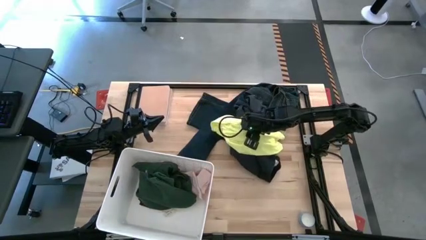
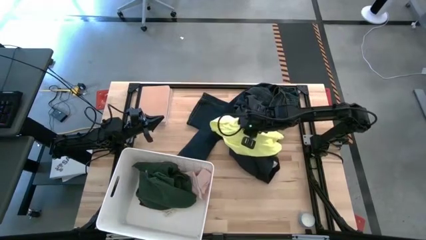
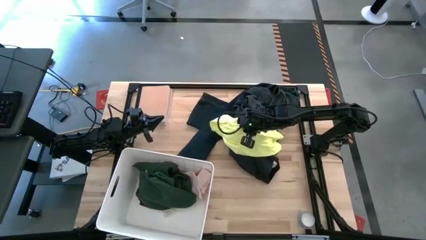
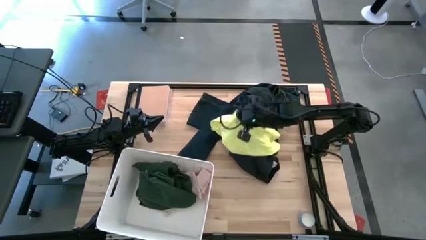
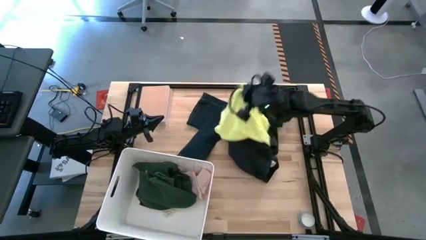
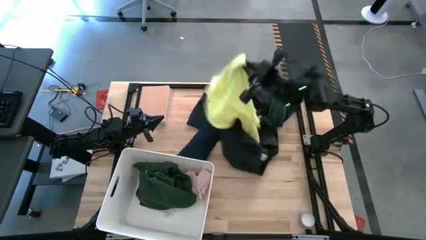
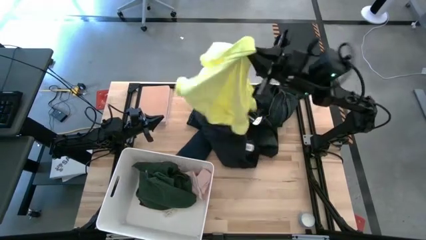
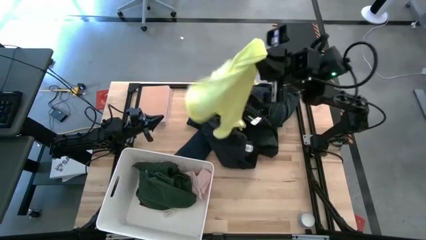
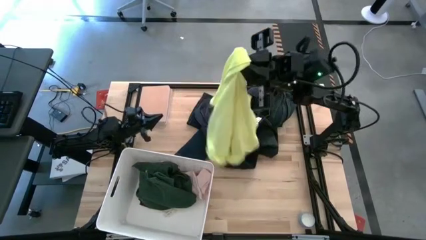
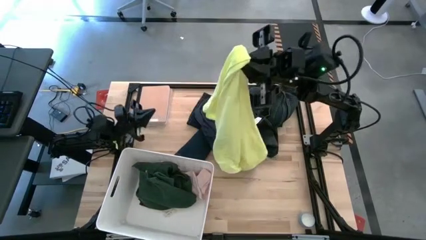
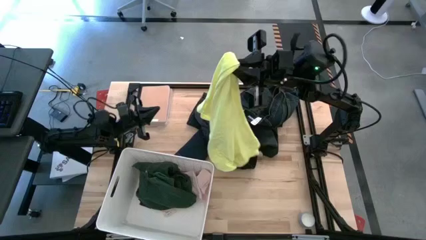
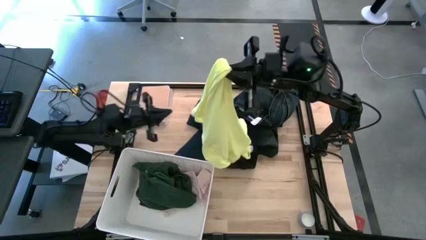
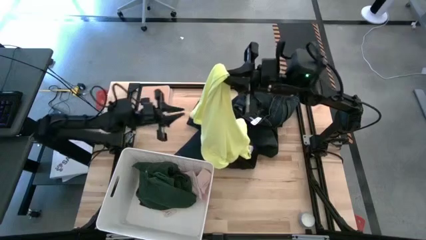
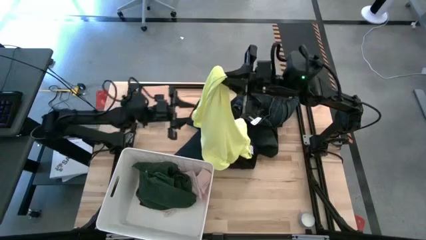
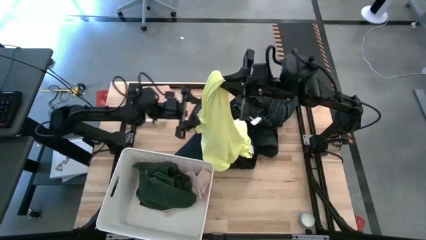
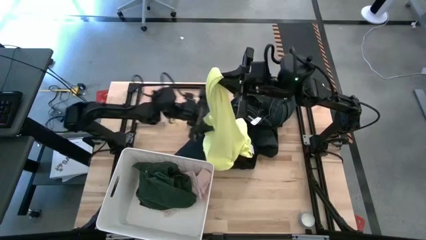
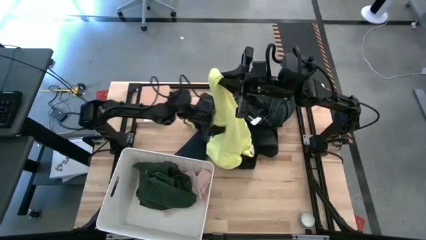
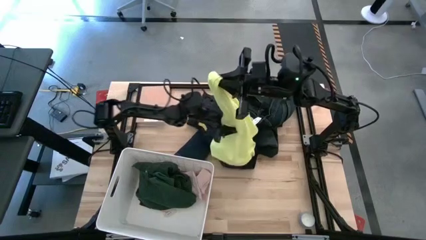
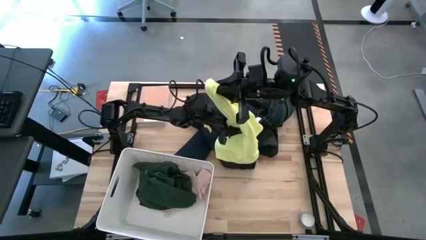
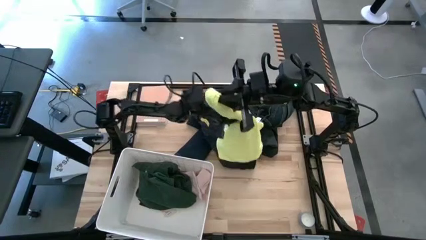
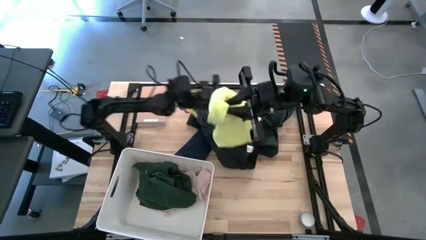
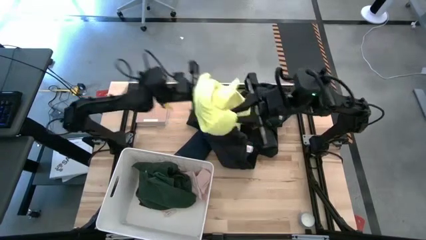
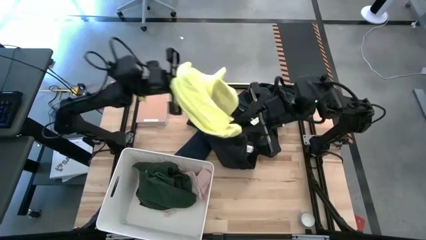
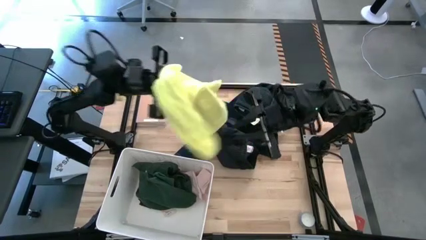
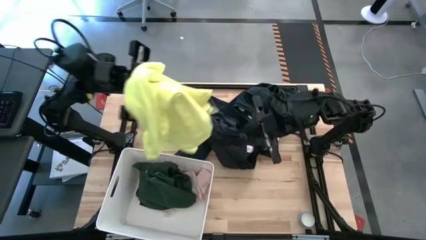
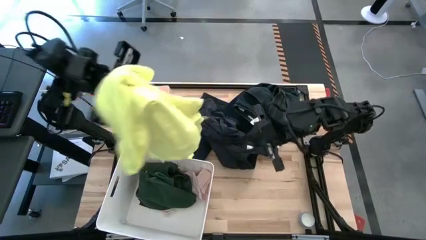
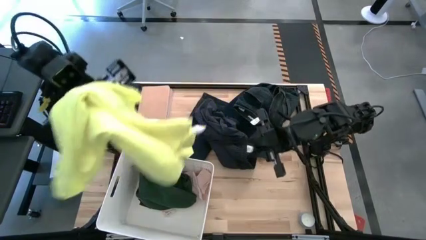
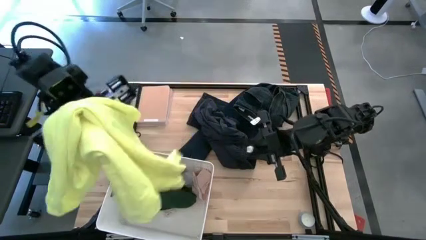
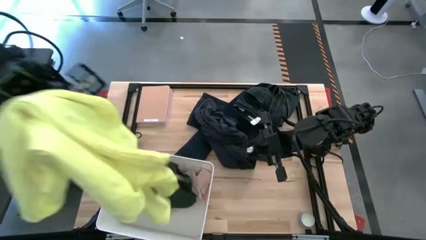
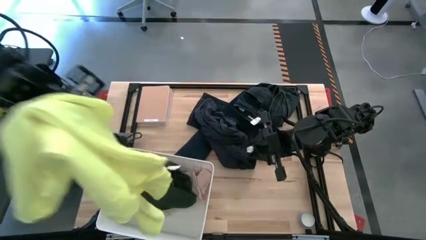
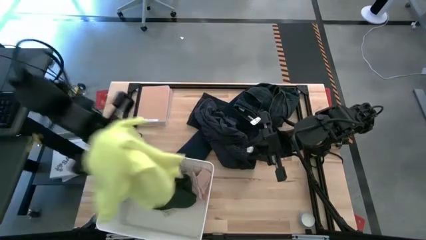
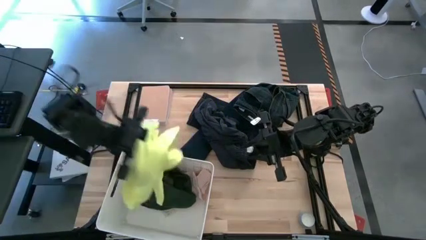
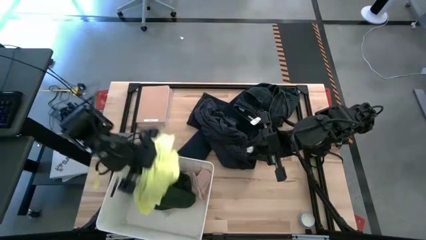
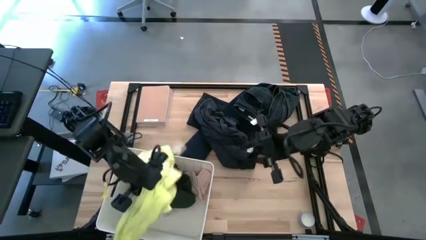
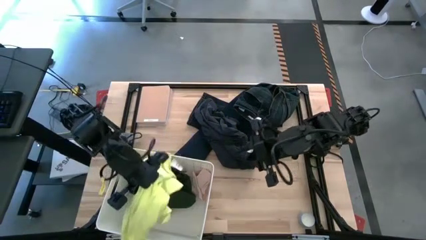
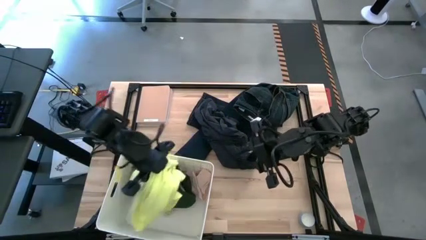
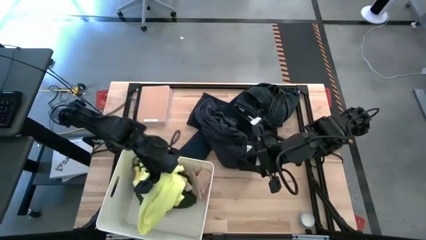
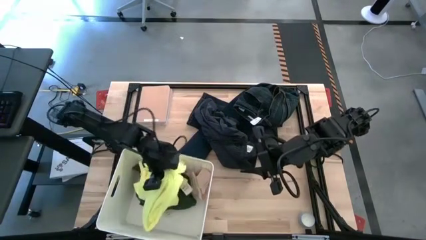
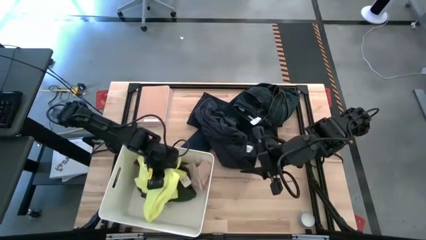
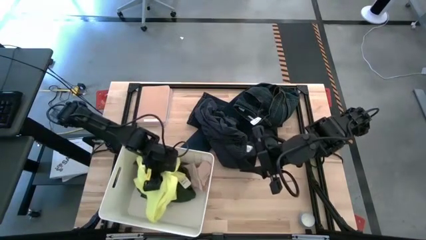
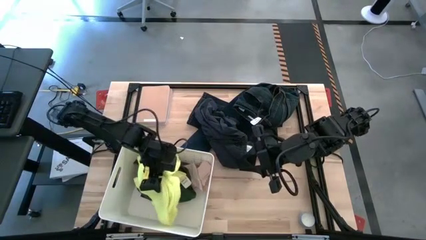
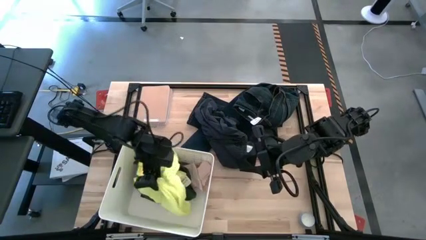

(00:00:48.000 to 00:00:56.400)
Task: Sort clothes
Put the yellow shirt into the white bin

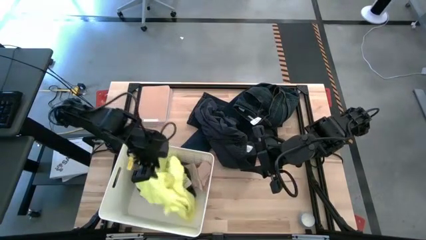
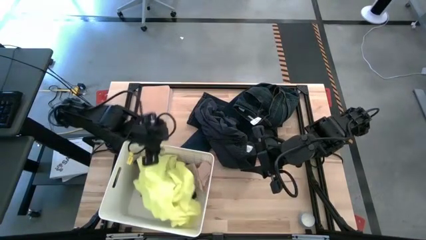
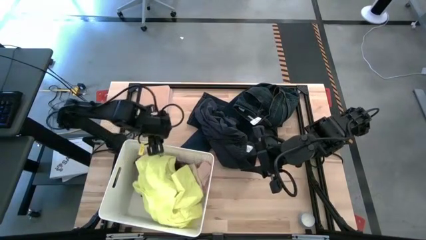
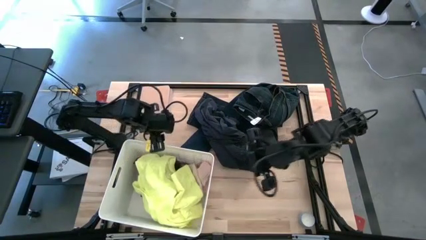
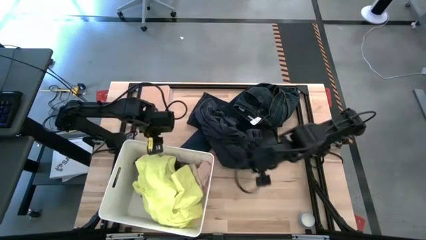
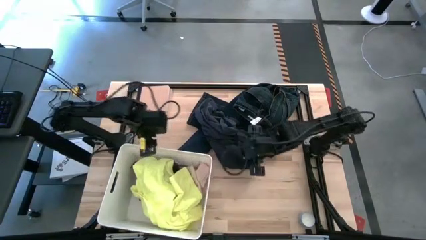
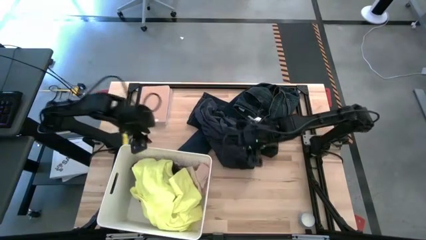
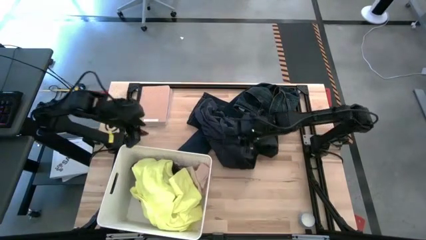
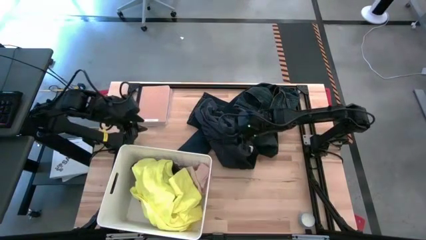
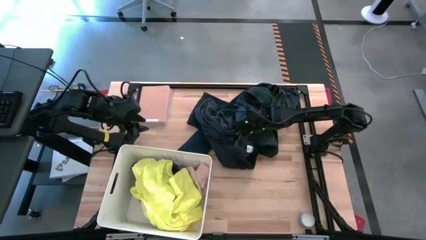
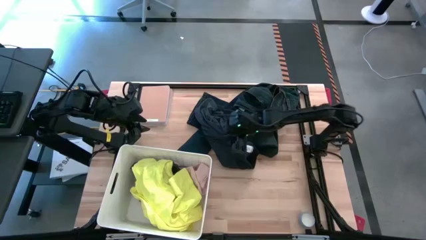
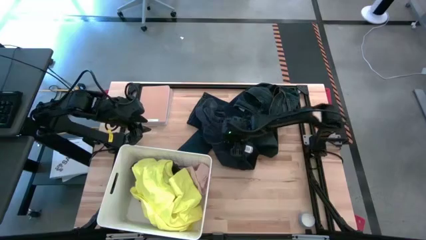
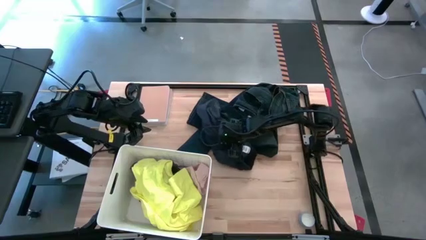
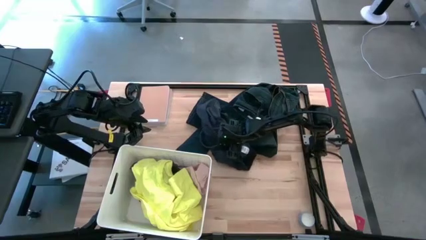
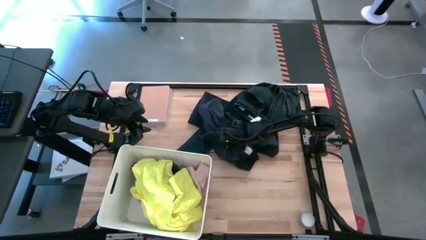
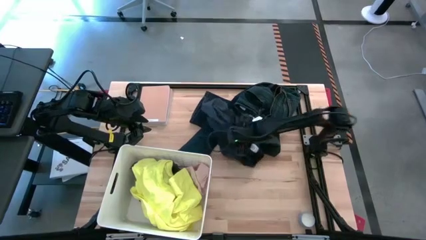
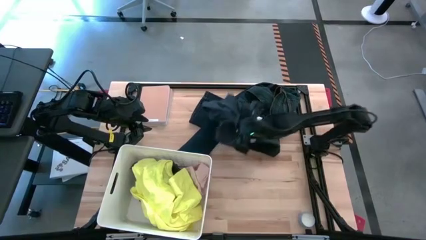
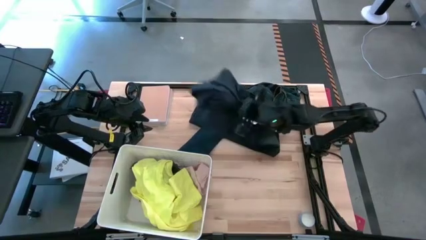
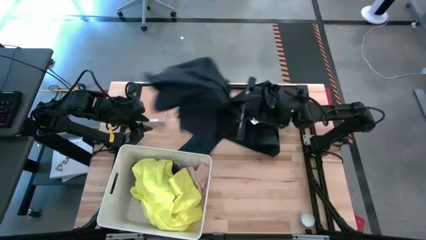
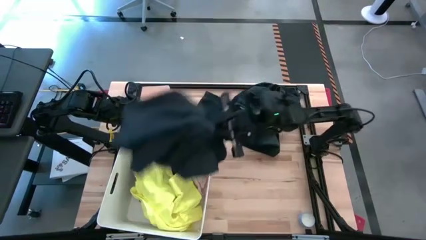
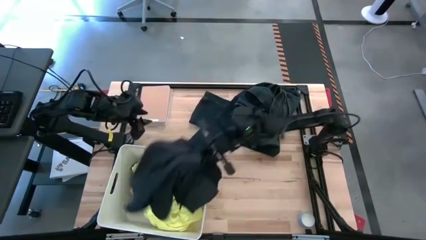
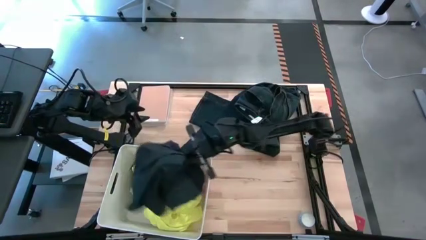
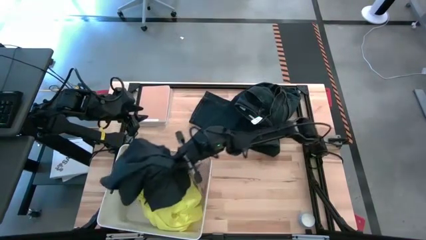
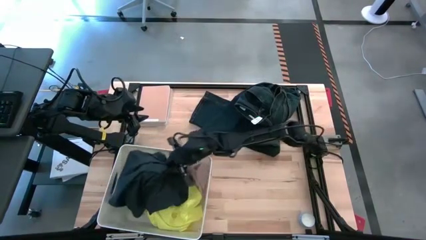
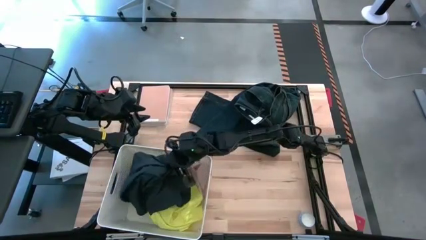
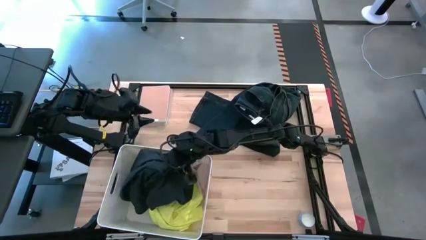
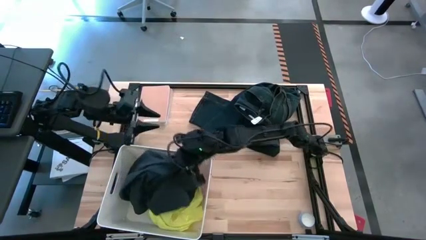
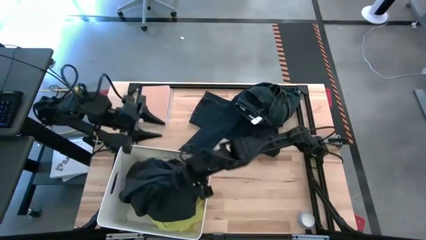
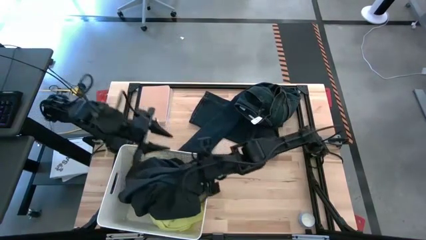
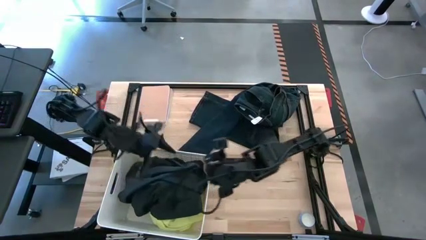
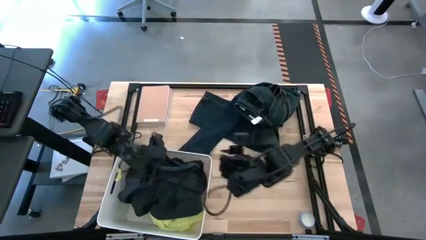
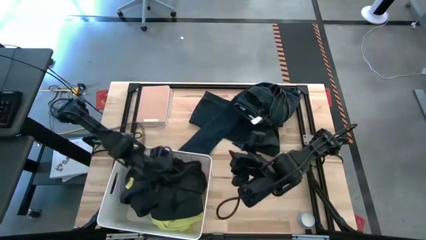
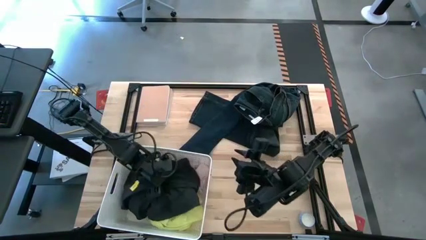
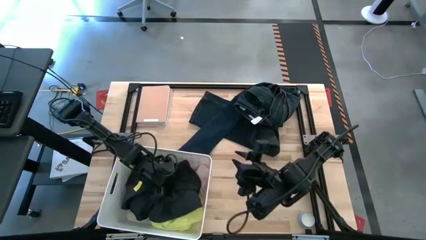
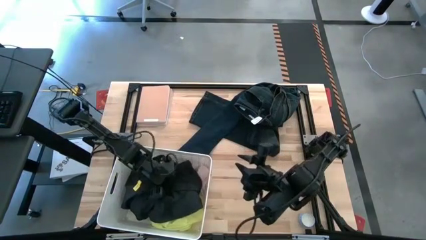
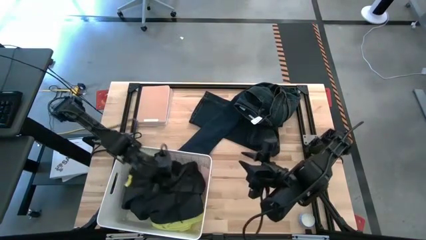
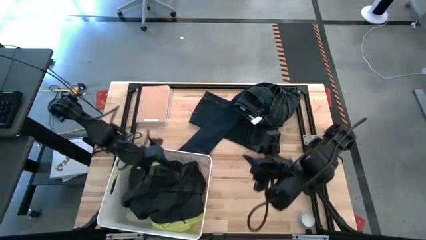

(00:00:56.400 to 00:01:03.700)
Put the black pants into the white bin
